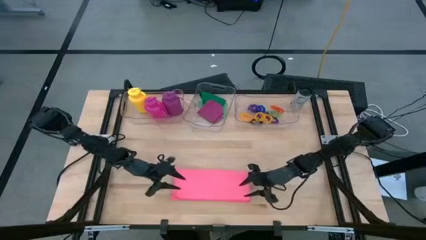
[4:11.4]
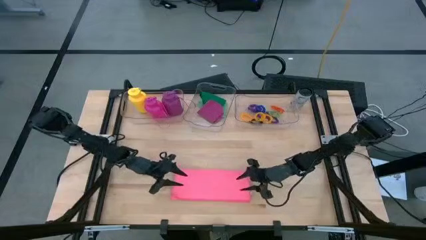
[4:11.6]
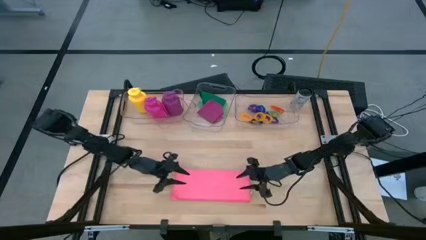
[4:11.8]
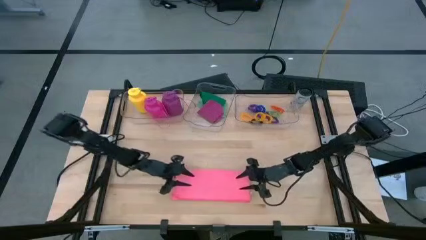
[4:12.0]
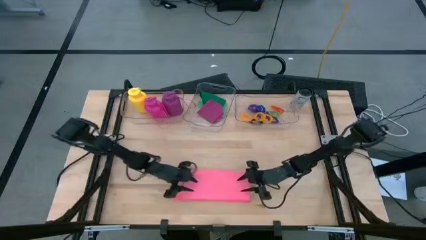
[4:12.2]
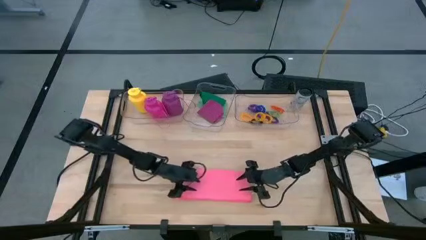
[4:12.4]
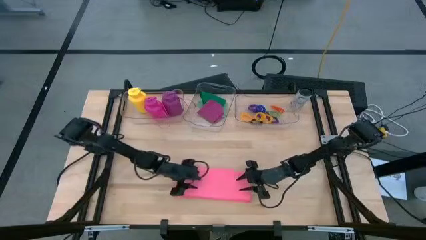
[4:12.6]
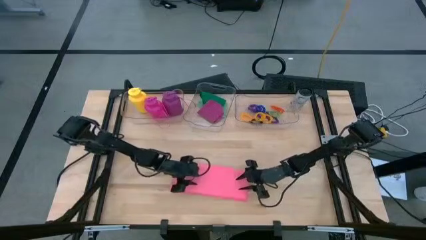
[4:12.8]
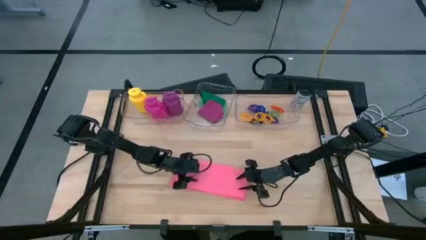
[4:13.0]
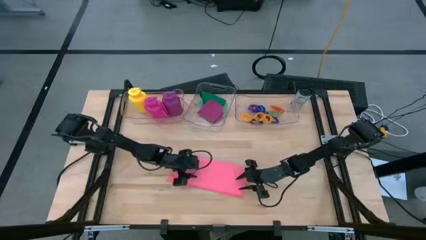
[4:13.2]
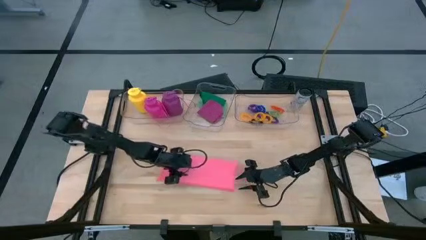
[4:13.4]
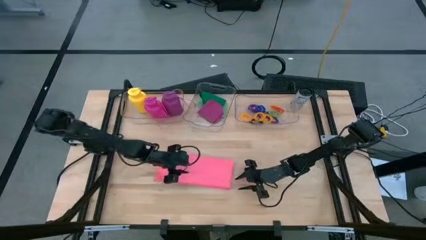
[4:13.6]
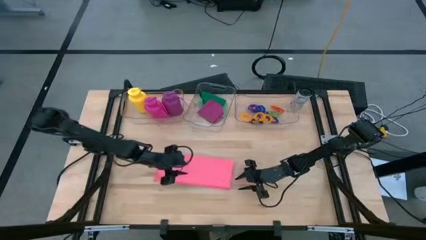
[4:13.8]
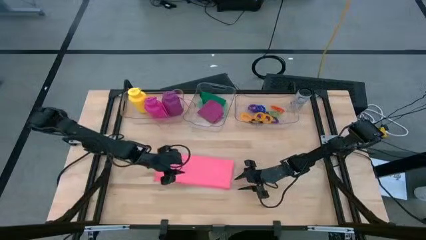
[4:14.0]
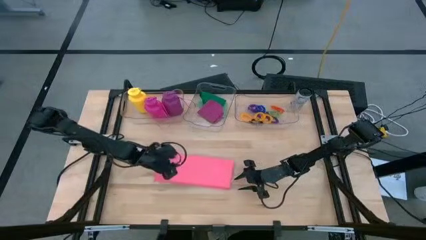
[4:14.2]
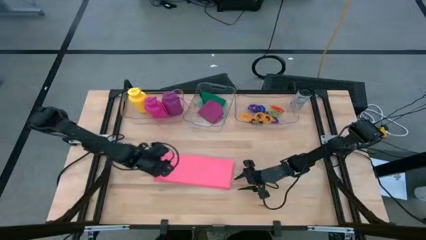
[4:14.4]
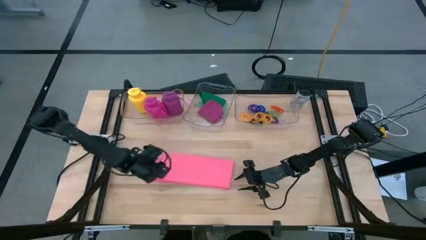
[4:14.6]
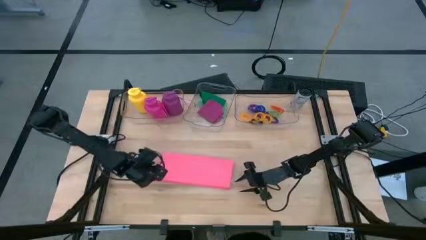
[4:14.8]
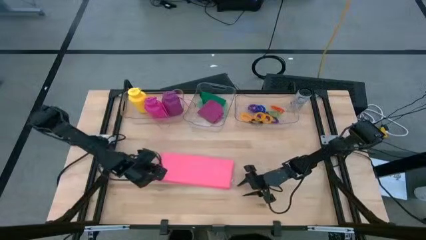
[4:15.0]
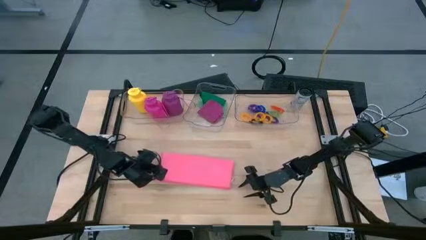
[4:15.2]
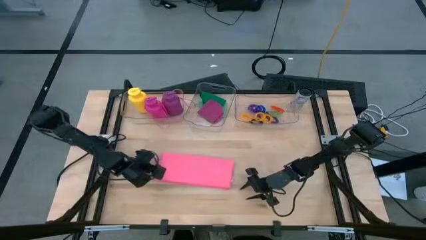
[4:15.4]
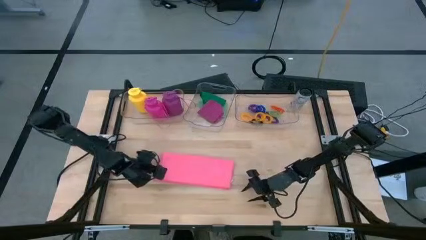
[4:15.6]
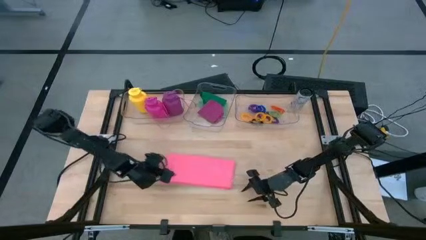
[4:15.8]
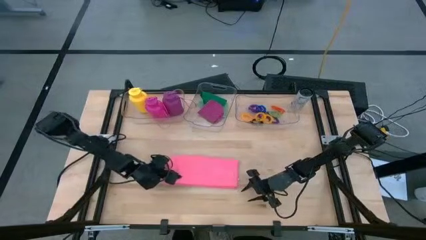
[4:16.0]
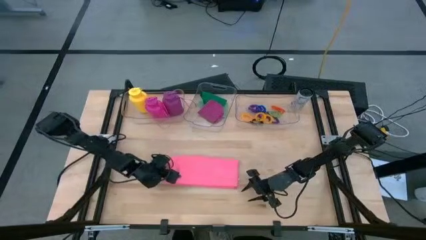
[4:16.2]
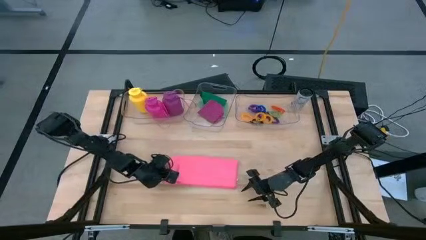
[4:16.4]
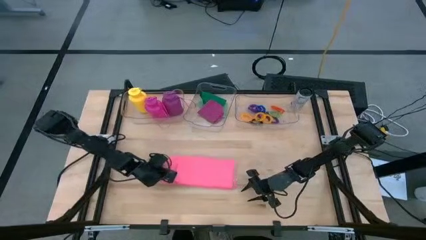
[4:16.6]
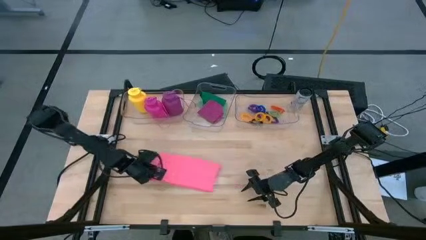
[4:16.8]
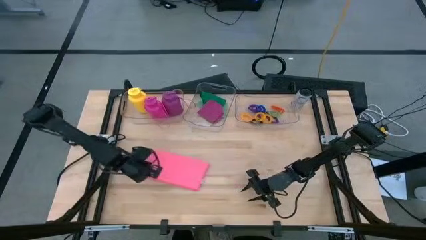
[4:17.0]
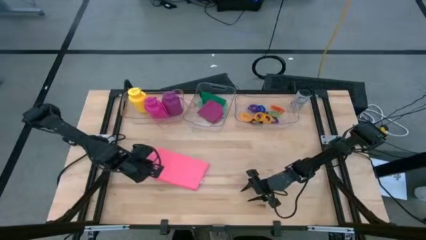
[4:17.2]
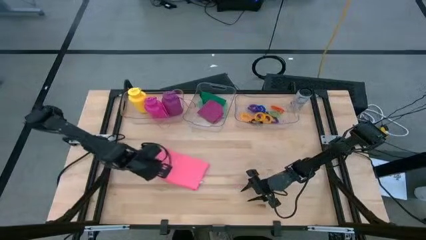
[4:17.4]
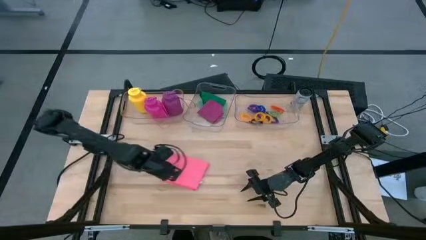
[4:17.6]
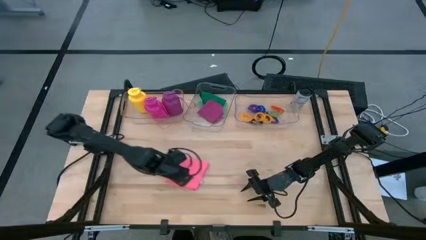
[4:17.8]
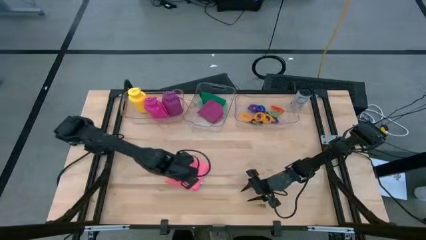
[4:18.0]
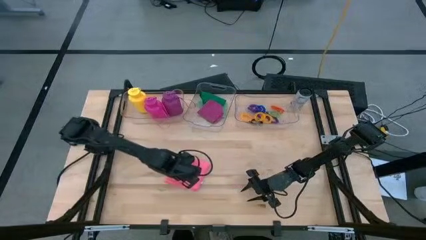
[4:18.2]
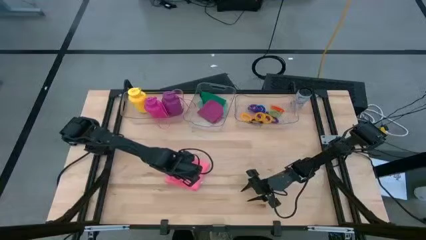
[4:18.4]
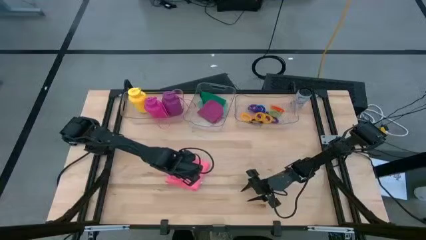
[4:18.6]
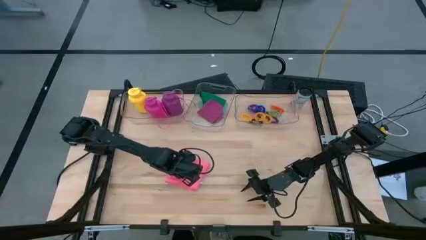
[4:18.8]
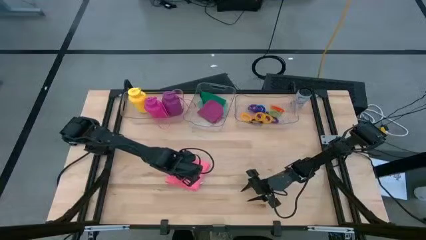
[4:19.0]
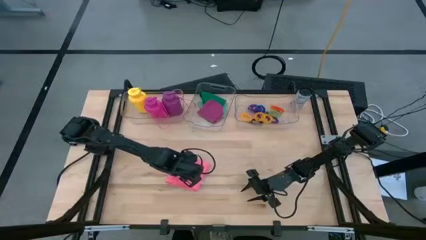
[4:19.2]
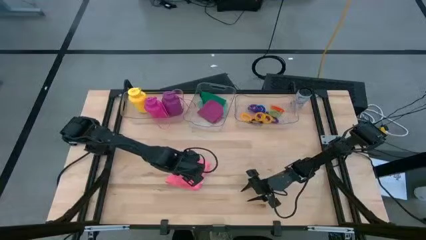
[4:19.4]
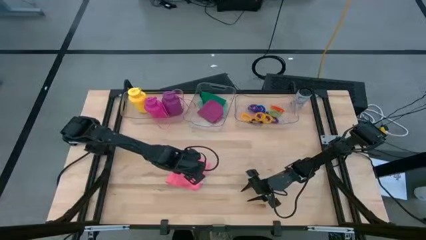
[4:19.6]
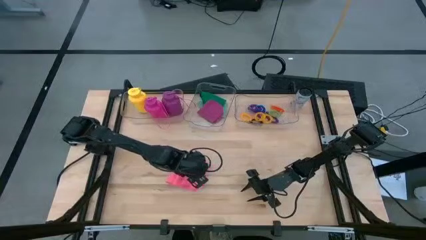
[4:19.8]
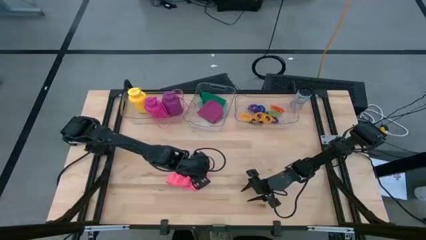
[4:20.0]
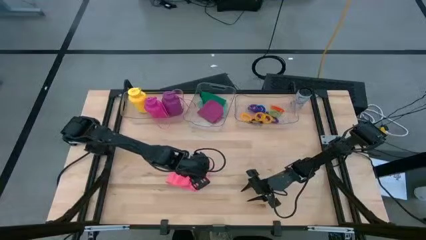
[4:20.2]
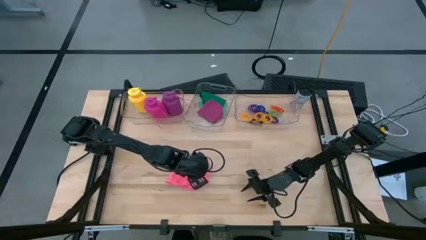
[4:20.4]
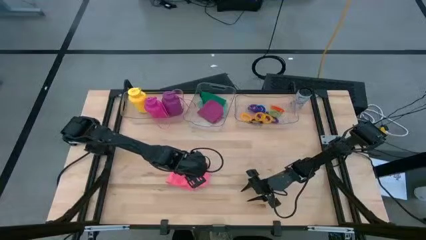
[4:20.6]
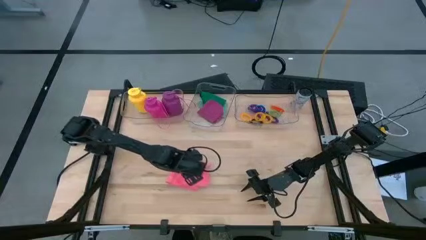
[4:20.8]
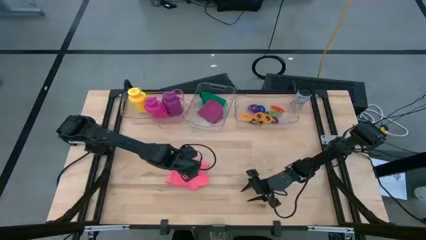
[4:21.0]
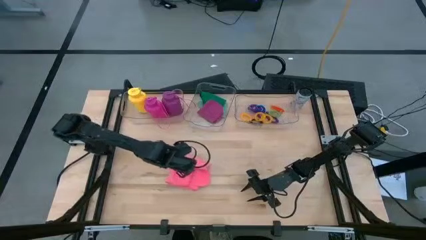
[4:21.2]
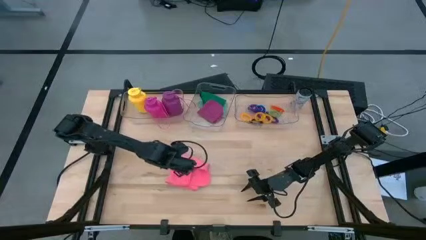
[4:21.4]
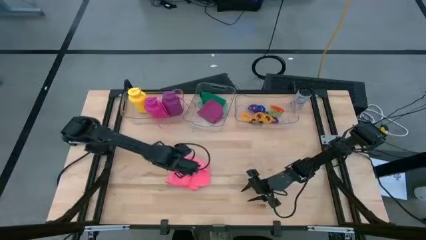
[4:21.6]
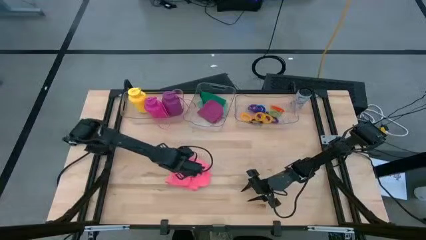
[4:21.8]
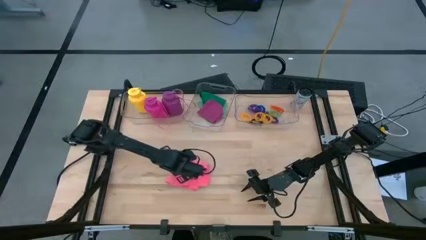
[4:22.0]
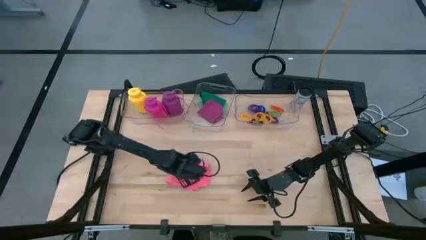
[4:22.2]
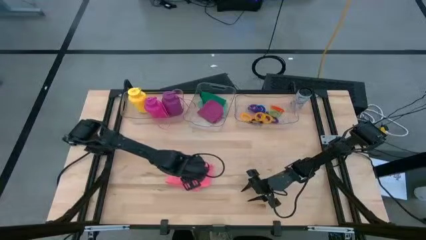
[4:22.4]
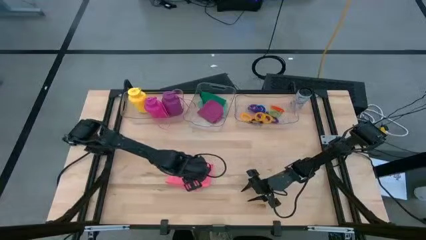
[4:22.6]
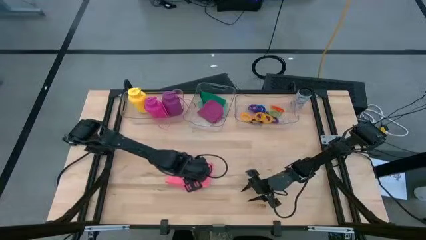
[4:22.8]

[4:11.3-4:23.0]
Task: Pick & Place Sports Items
Fold the pink microfiber towel

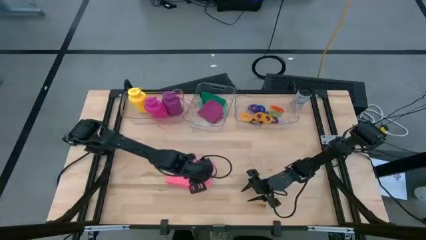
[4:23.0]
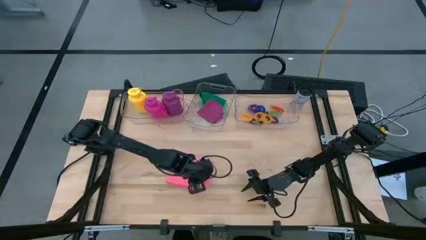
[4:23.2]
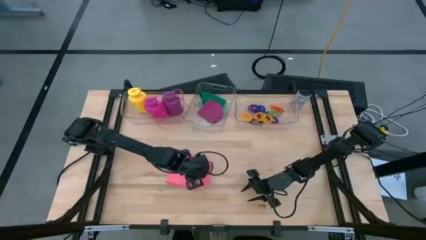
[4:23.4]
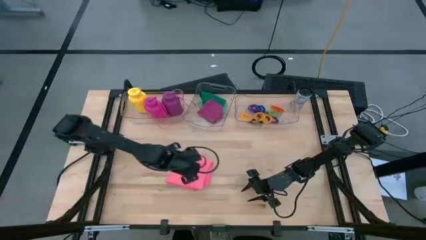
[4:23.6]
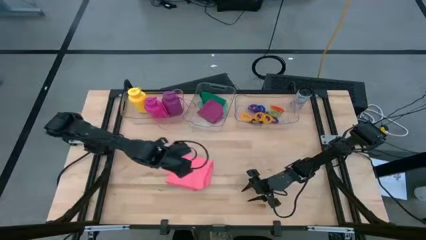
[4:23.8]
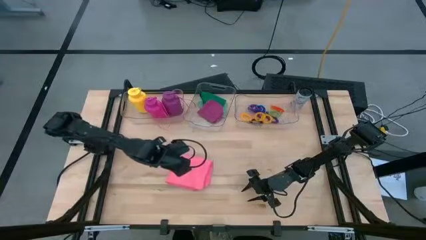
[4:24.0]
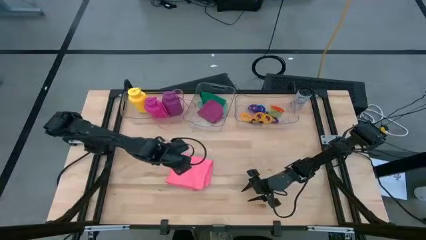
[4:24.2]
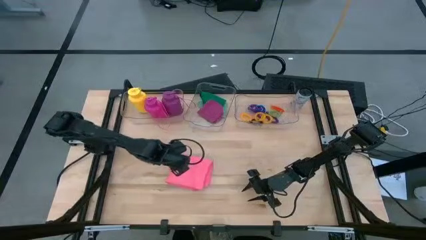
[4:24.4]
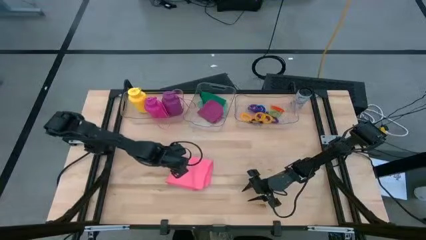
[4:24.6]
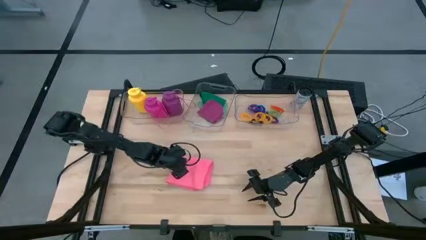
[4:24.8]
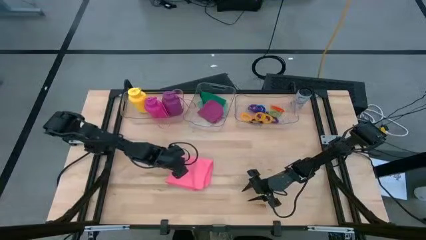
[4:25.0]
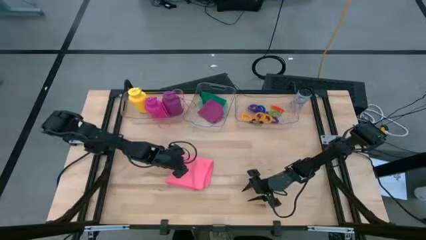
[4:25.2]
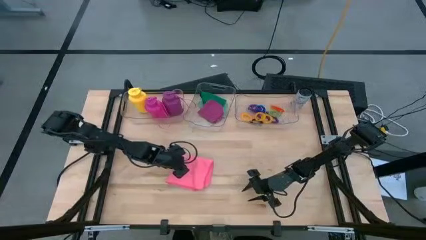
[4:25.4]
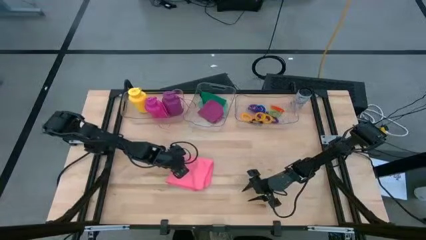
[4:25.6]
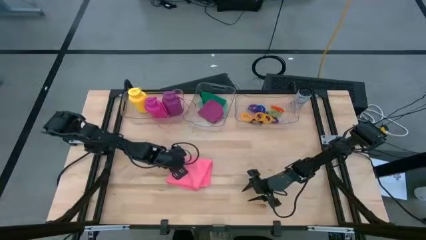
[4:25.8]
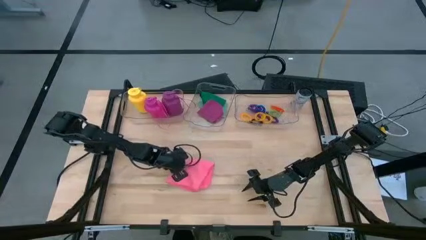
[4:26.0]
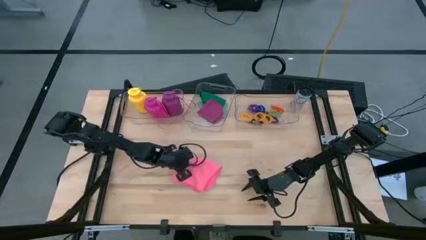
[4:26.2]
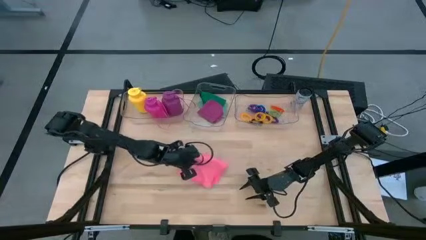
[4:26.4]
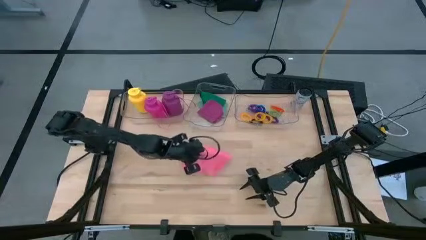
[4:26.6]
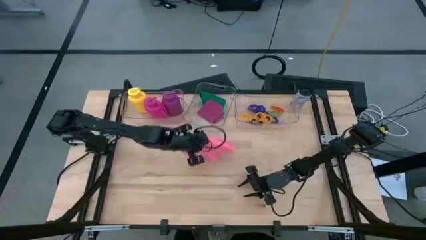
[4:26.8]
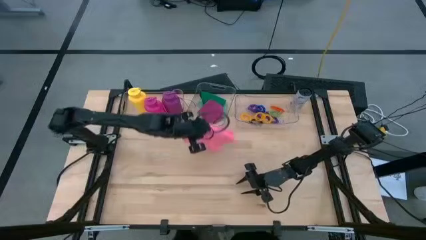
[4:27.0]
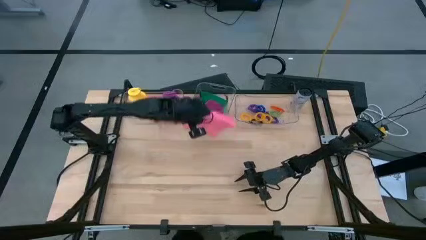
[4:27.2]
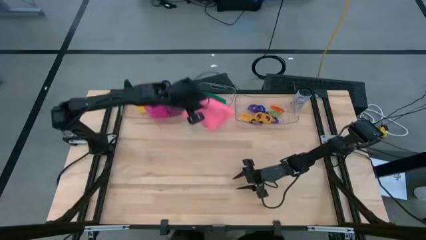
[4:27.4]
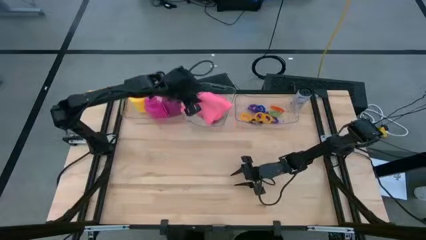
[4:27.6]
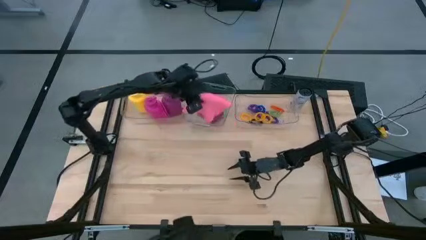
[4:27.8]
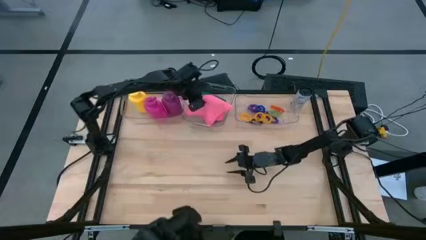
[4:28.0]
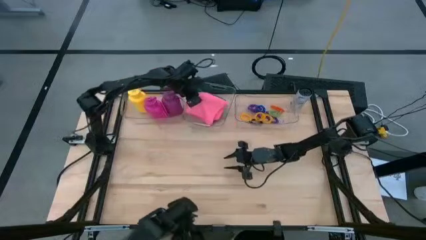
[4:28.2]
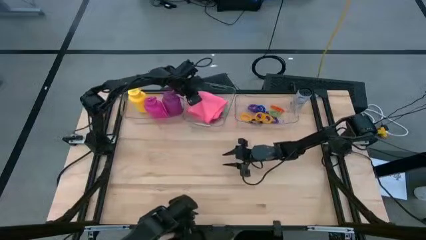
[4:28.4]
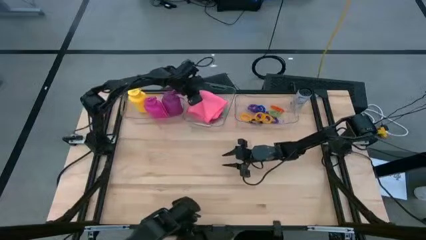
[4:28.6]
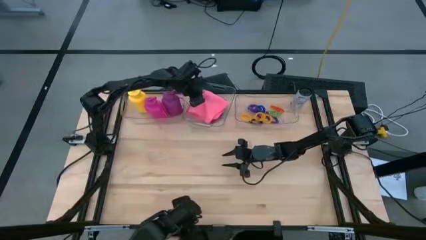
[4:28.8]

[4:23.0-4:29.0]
Put the pink microfiber towel into the middle transparent bin
